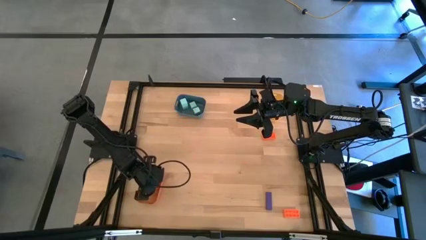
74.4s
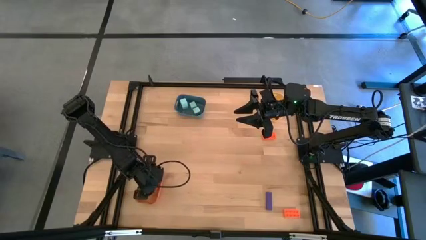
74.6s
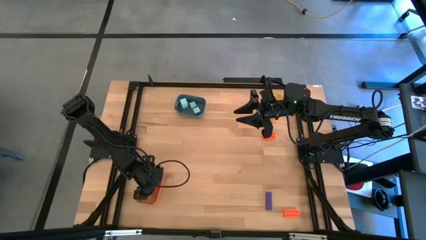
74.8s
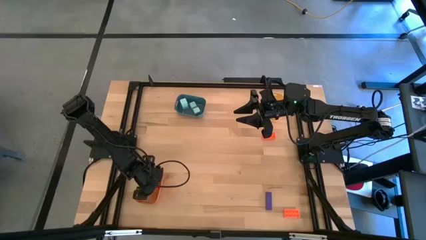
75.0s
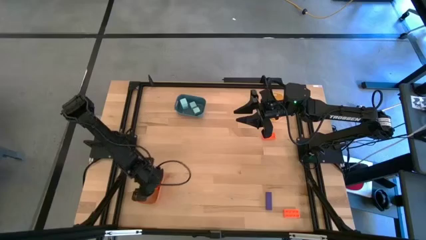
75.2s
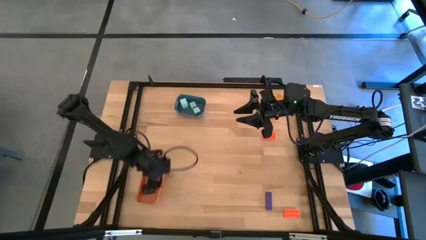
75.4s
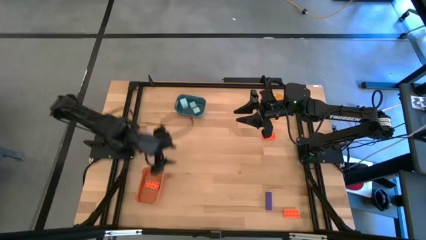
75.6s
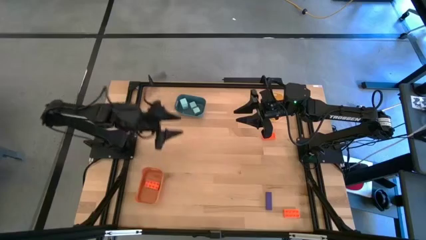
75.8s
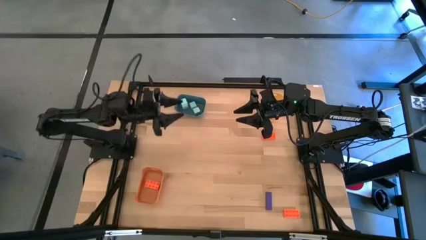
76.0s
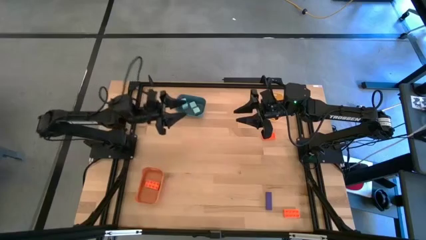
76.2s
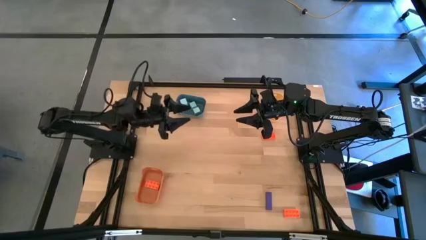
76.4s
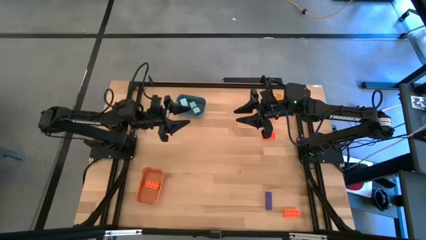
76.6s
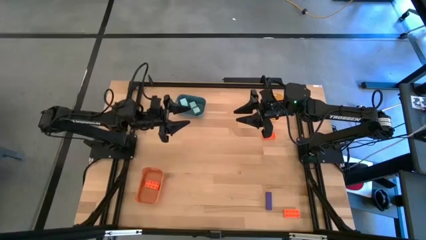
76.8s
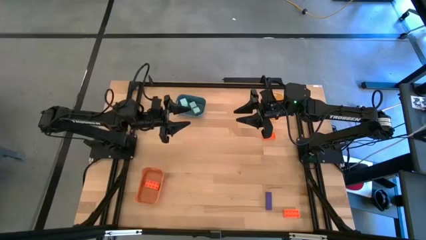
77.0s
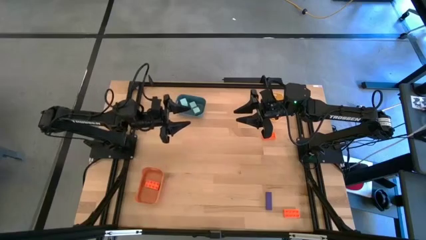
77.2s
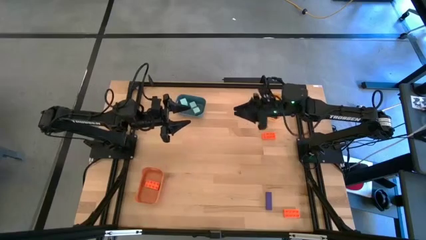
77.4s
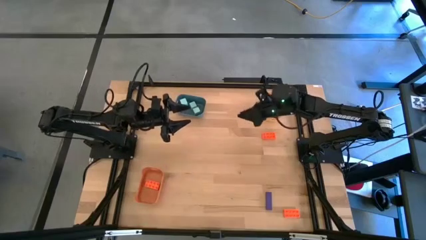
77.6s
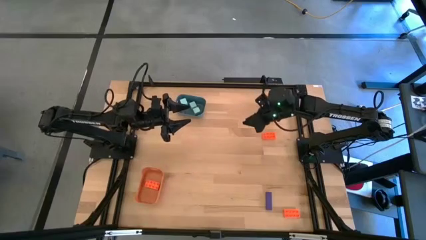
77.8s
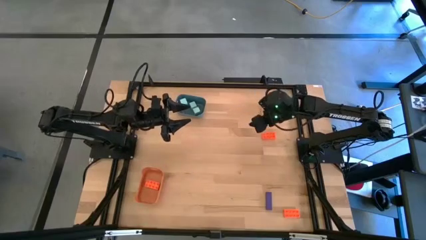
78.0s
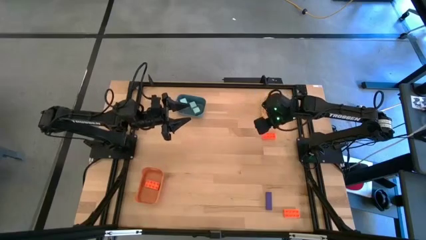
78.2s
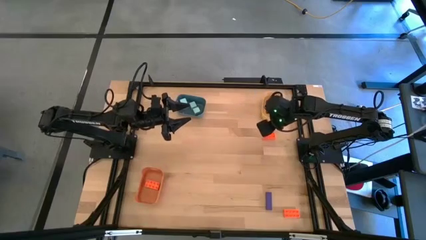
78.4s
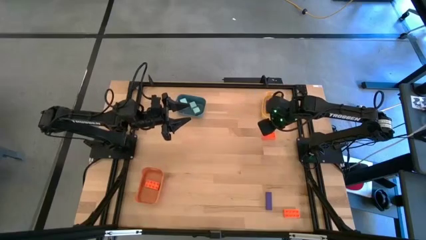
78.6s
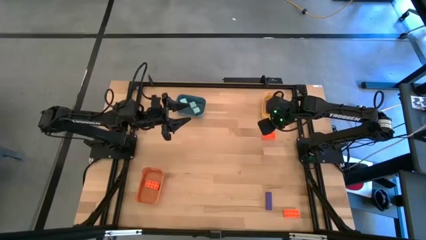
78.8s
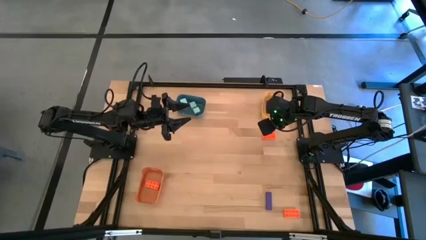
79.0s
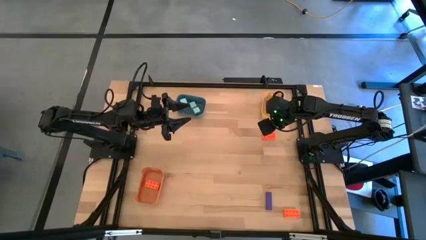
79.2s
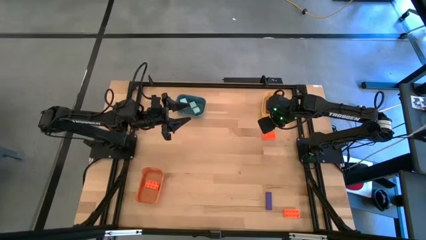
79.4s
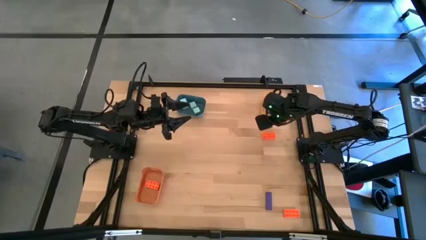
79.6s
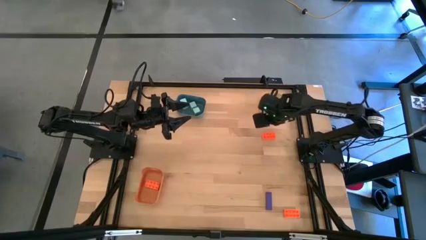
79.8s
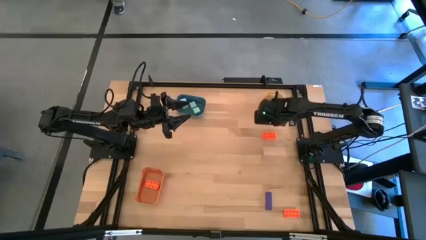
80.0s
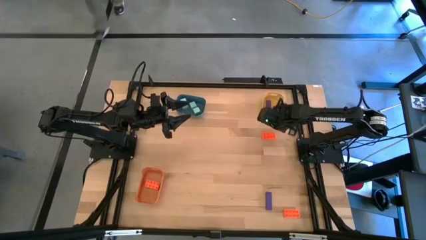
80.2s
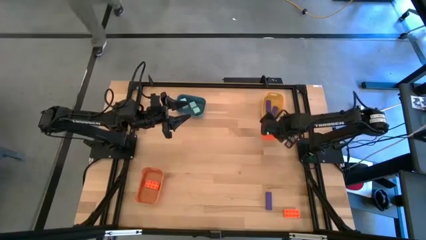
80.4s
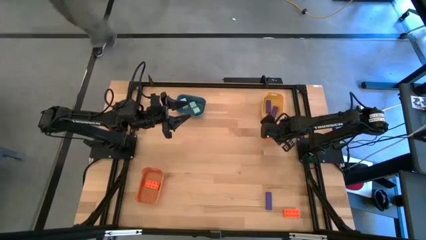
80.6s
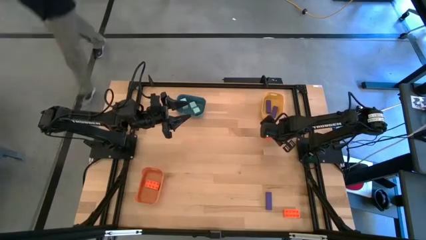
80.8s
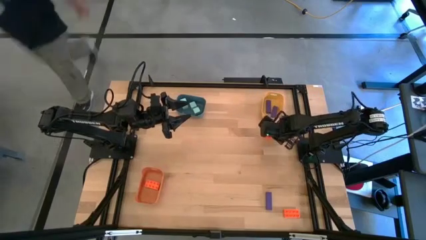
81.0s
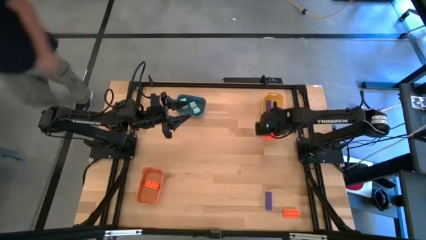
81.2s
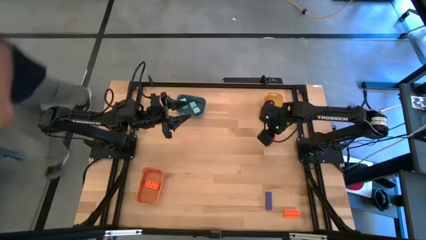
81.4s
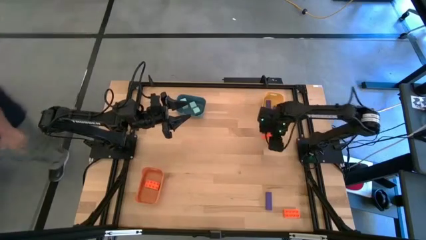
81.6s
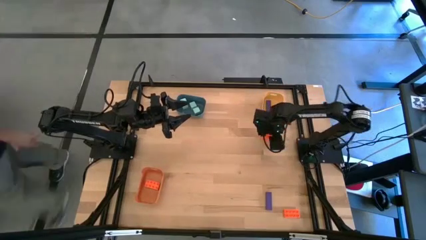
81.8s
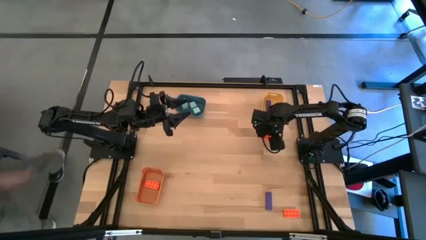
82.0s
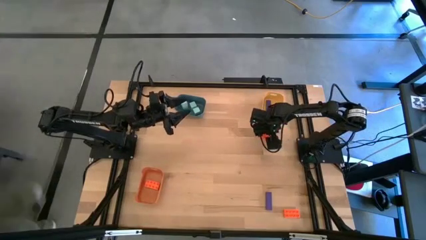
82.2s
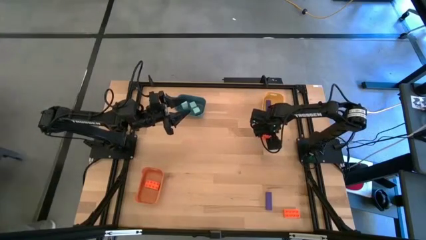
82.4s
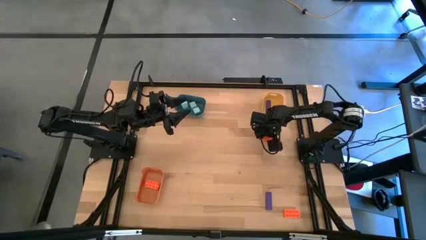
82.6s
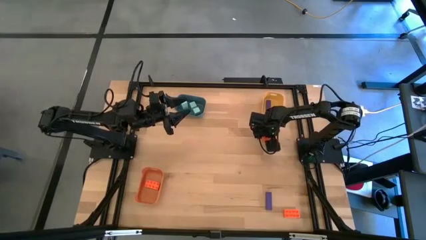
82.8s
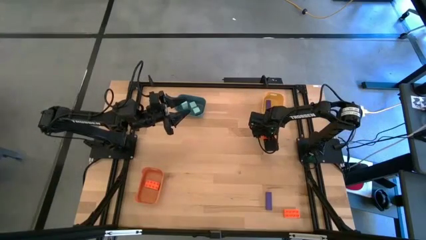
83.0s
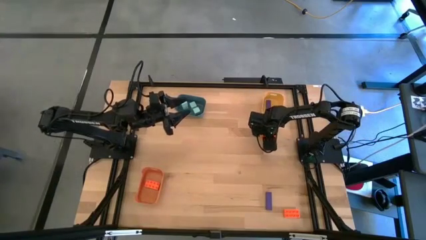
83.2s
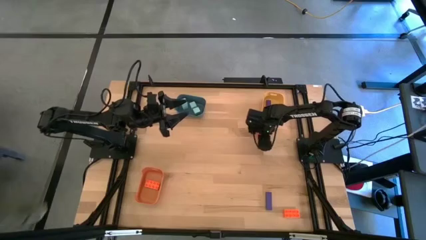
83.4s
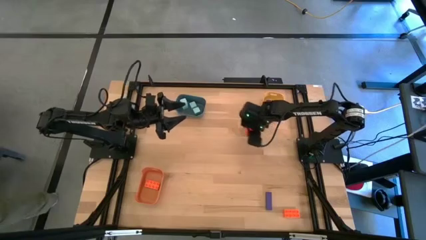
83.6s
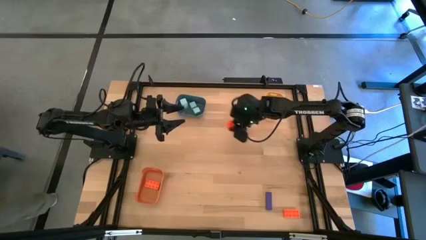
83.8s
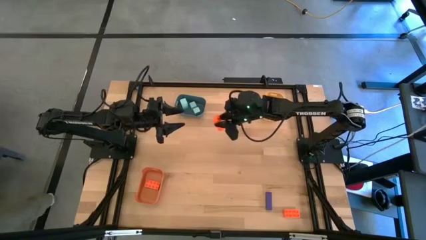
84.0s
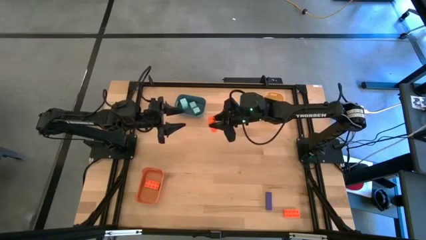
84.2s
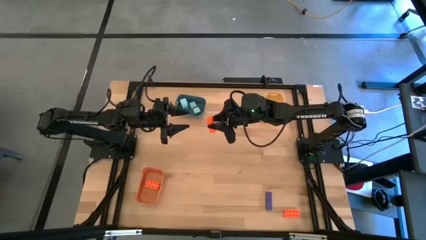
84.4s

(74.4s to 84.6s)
Task: Sort & place blocks by color
Put the top orange game piece into the orange bin

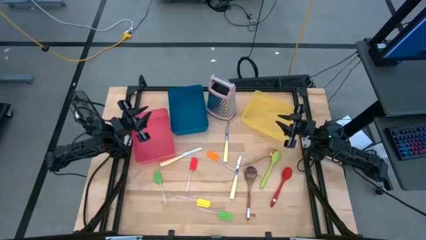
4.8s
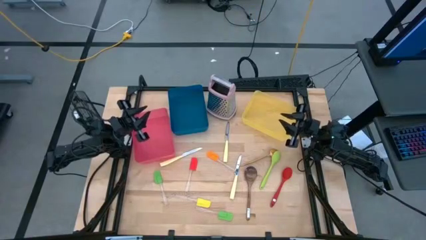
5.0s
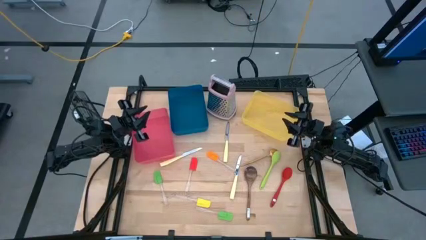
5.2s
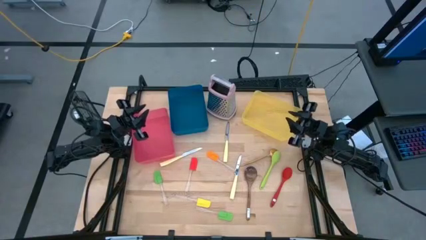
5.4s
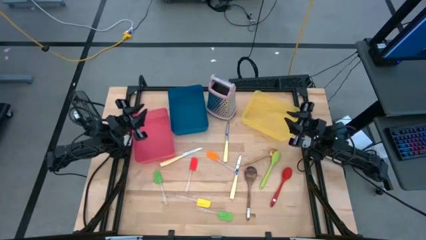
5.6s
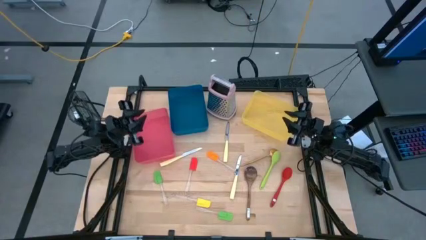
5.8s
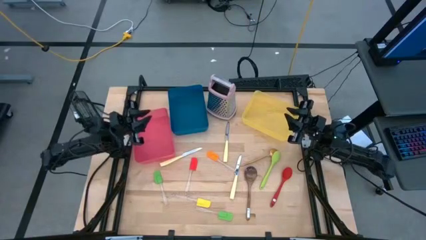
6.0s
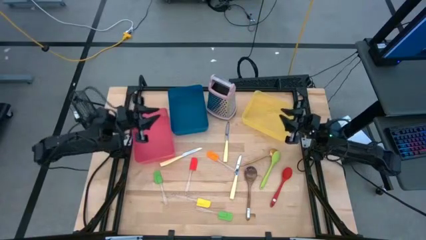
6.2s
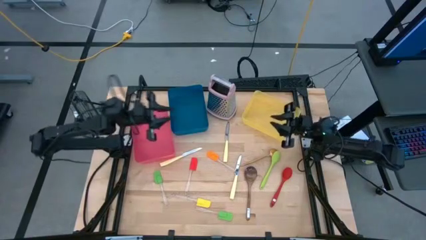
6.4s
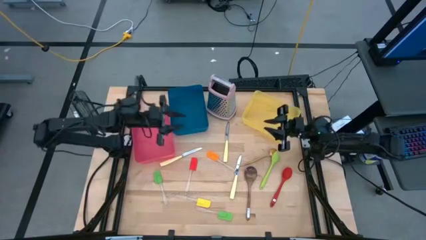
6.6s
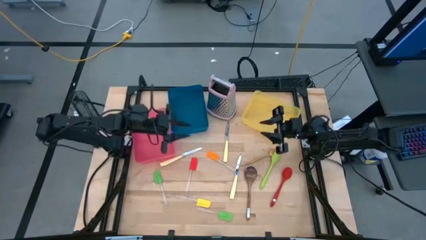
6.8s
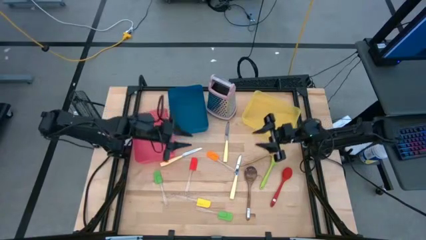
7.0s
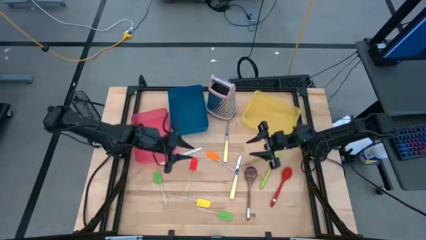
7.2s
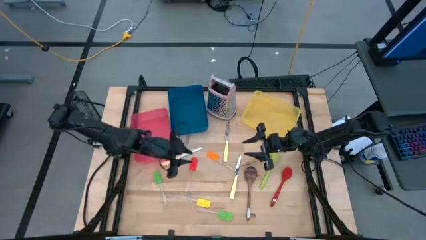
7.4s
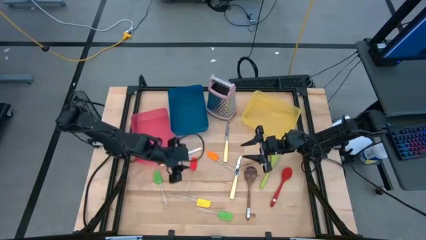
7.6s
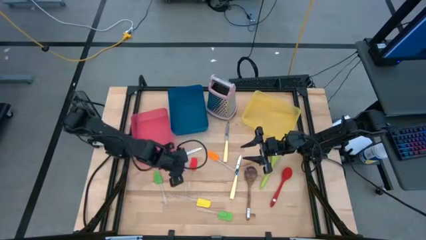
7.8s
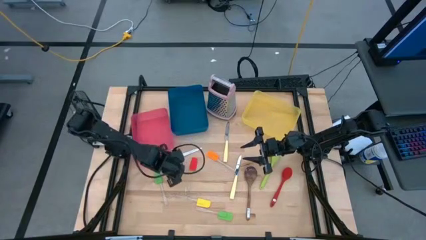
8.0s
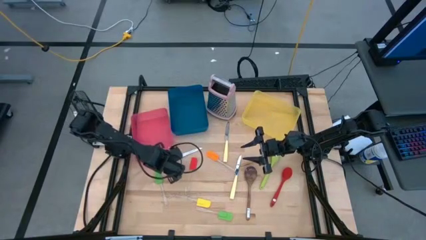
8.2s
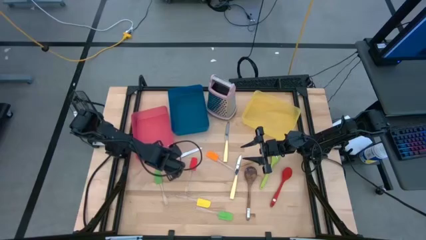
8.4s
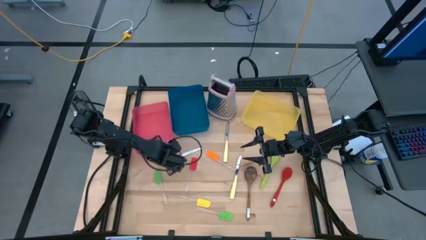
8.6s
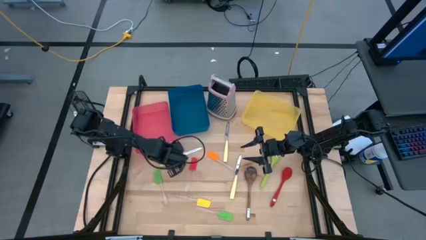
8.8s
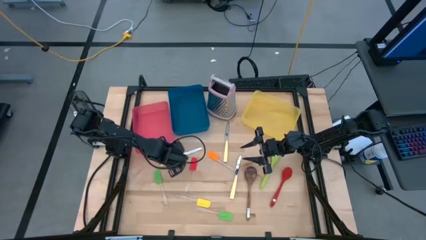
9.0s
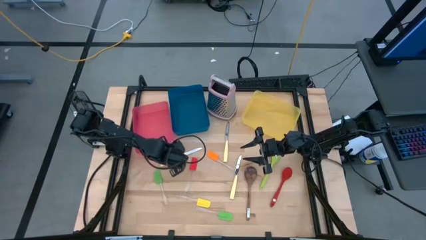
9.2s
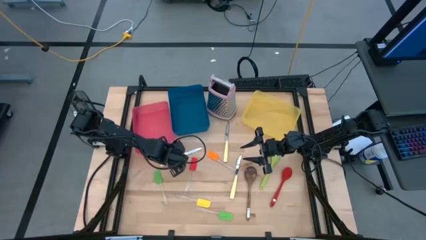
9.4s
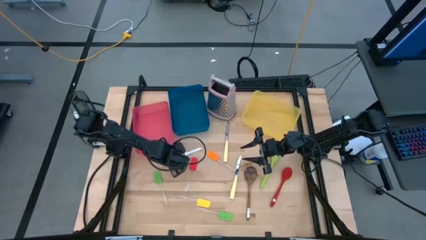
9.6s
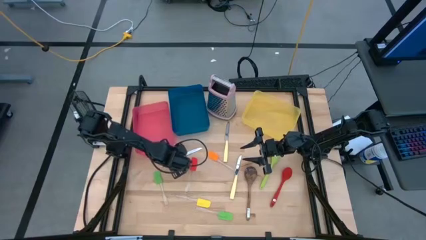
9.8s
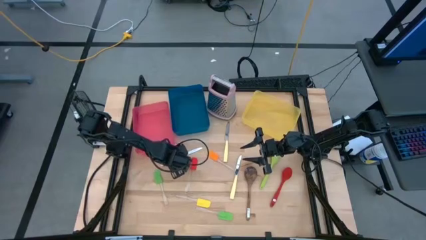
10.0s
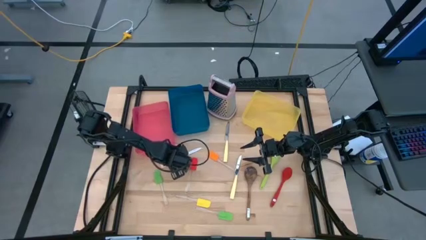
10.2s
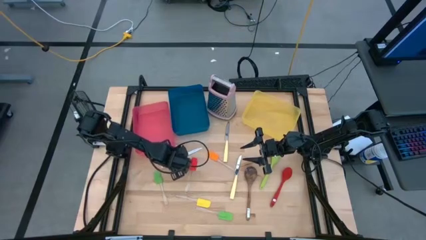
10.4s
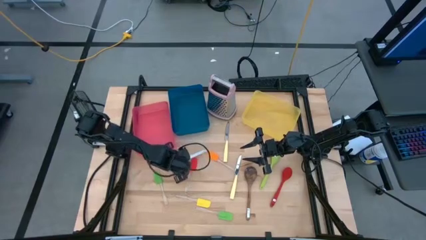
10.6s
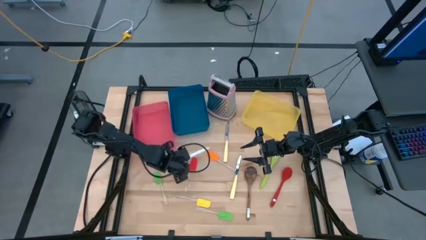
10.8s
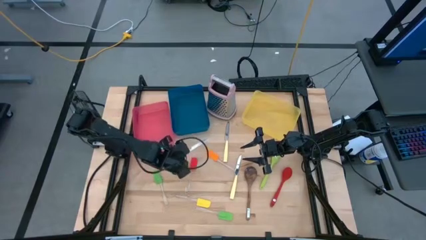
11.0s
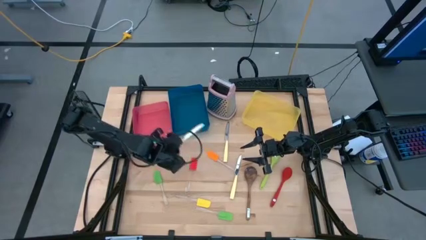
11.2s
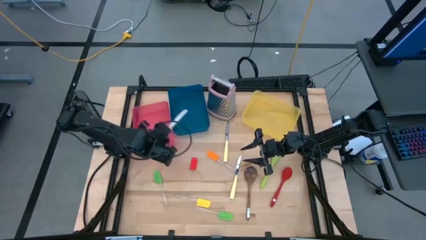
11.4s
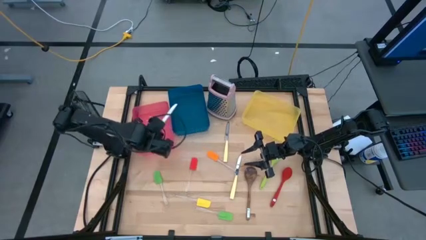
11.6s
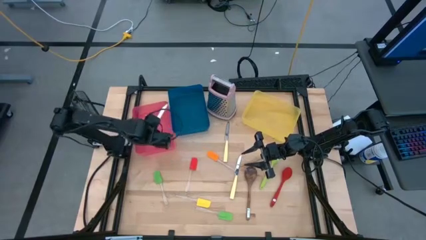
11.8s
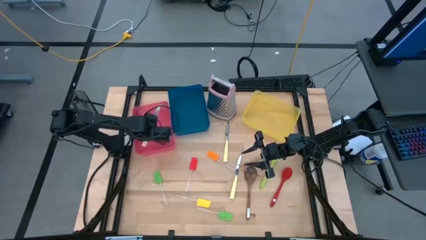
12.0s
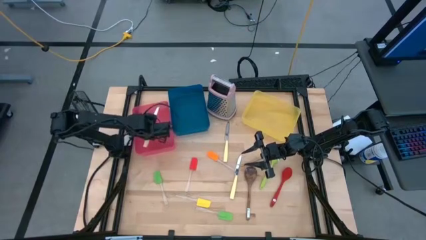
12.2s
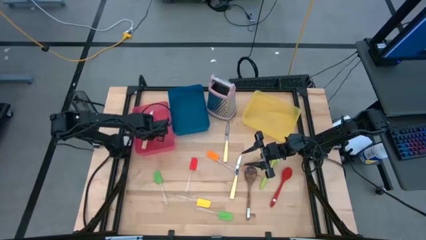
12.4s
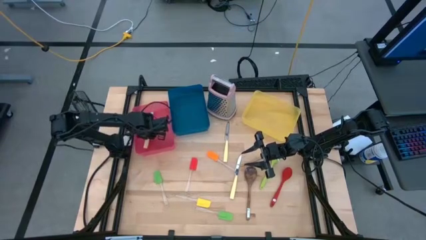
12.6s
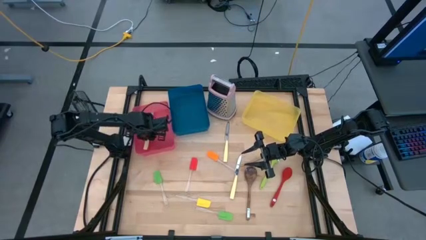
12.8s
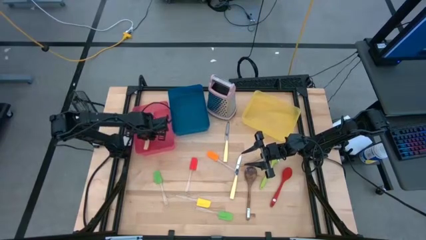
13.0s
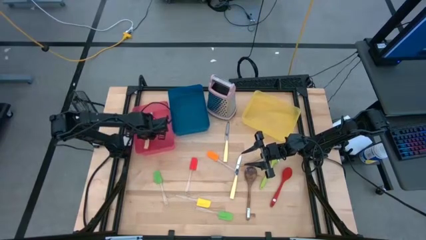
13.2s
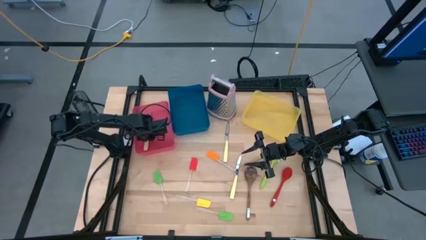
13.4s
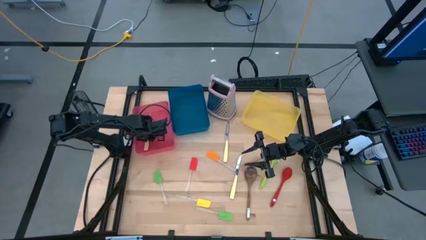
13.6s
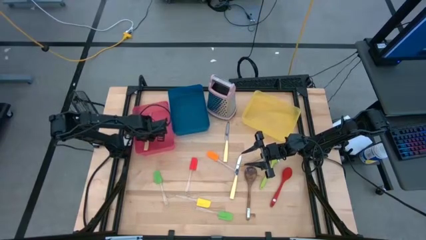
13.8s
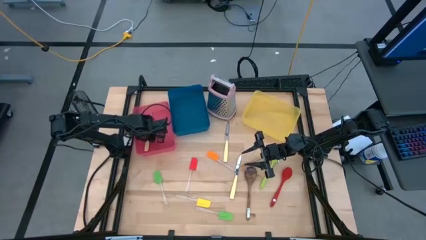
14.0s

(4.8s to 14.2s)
Task: Pick & Place Kitchen Items
Put the left yellow knife into the pink bin
